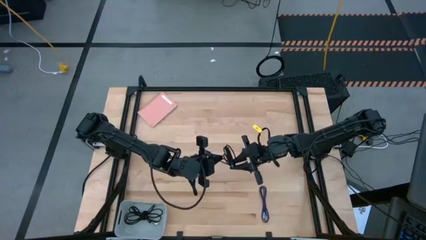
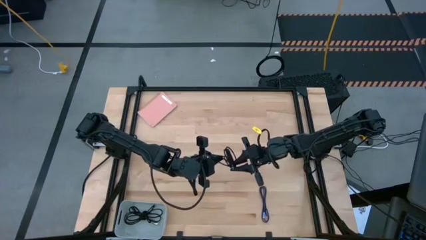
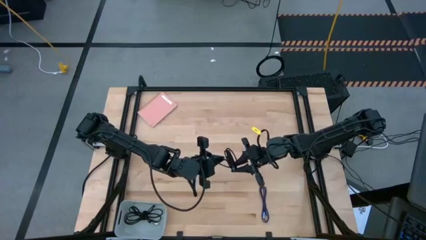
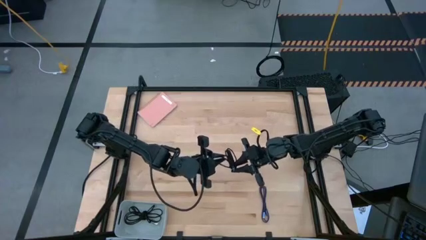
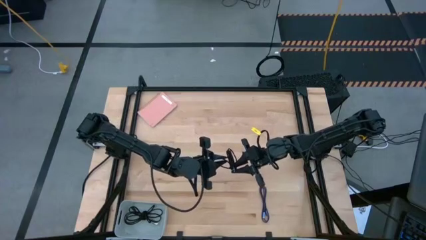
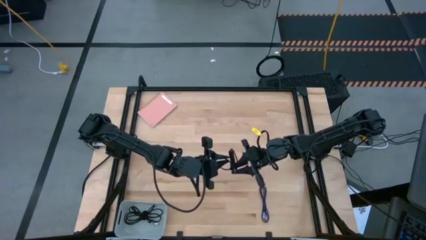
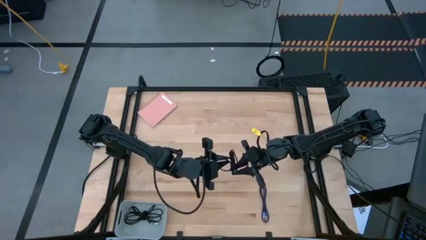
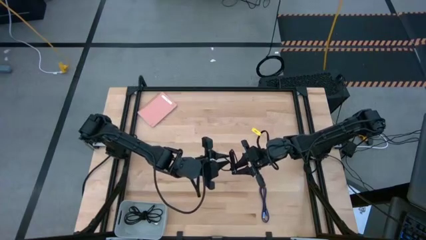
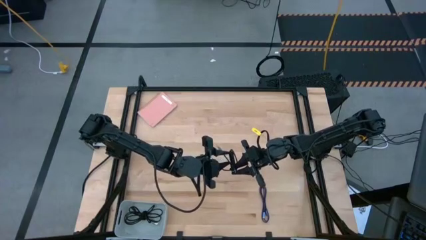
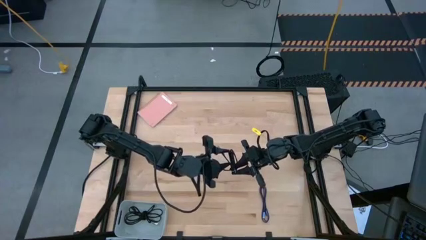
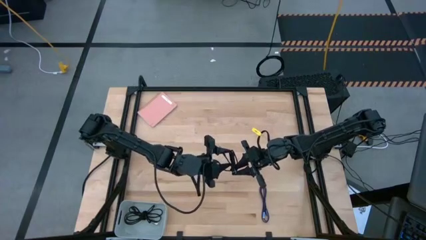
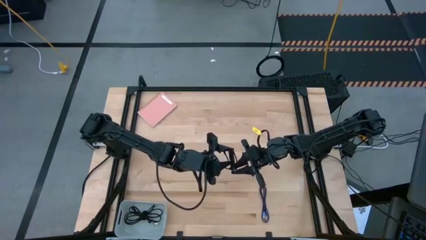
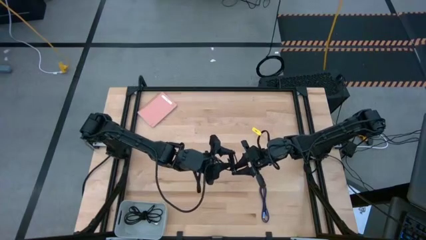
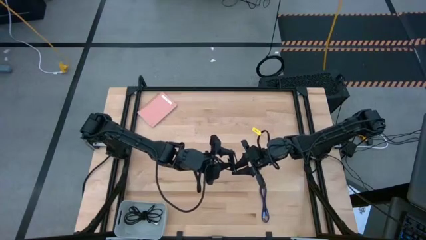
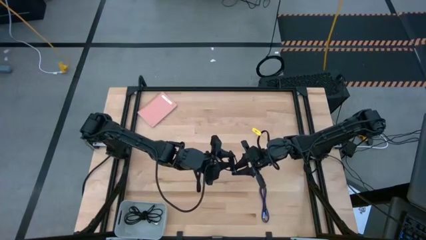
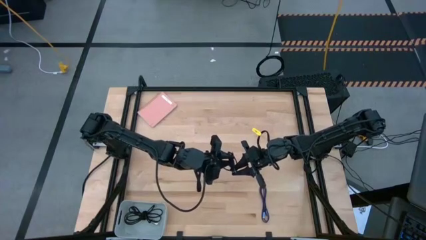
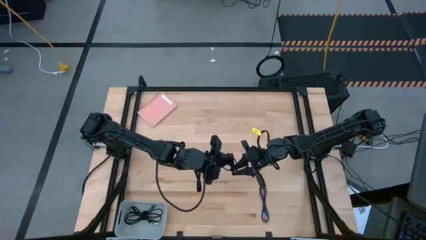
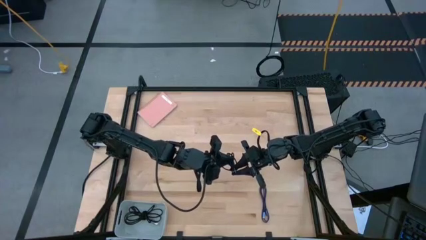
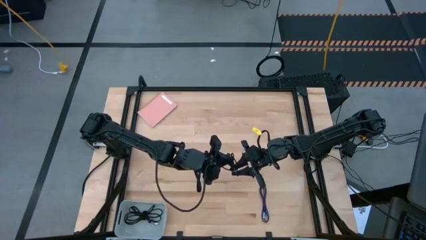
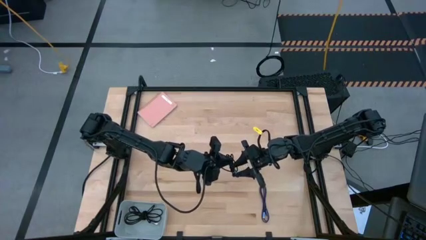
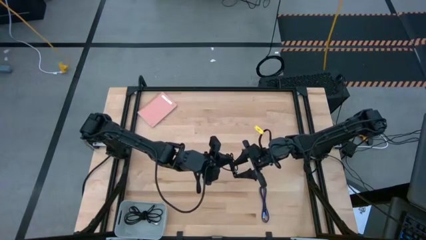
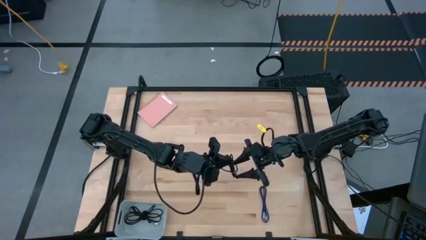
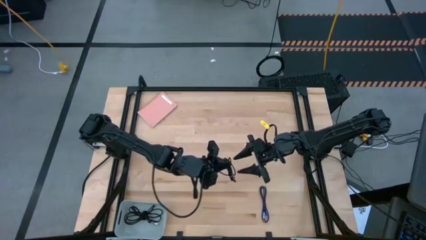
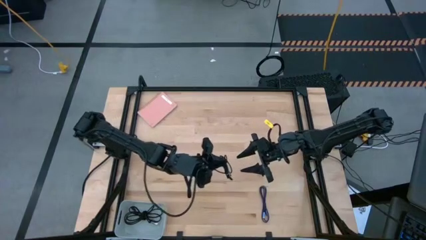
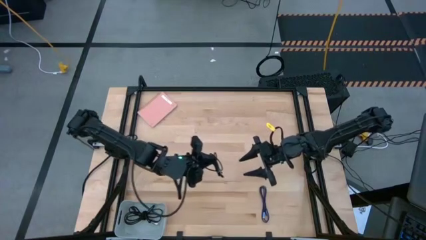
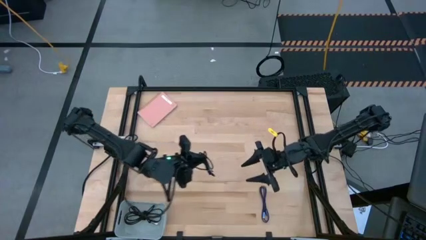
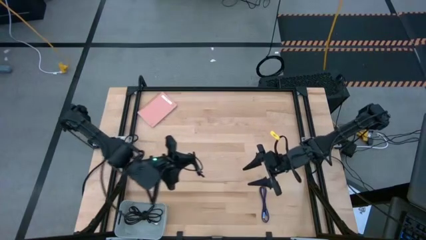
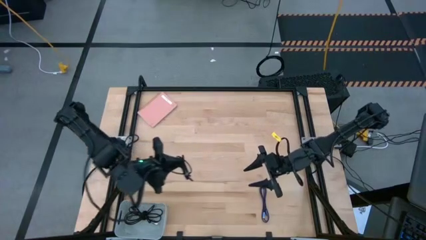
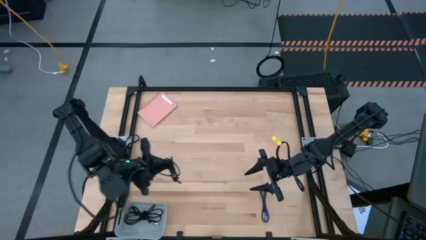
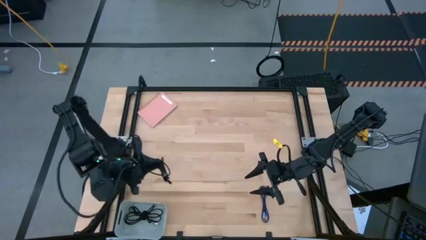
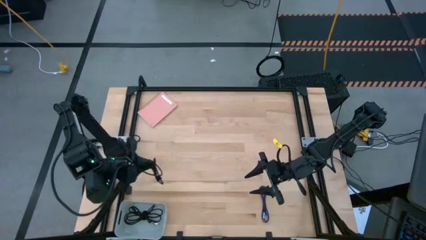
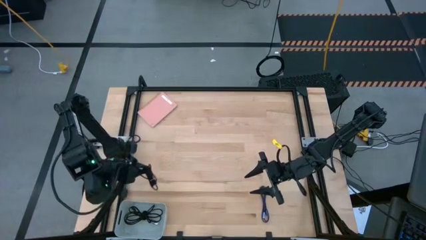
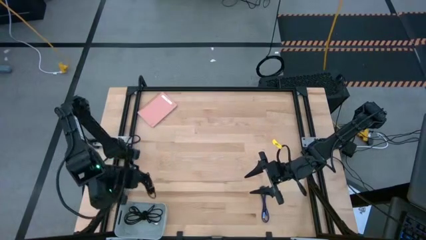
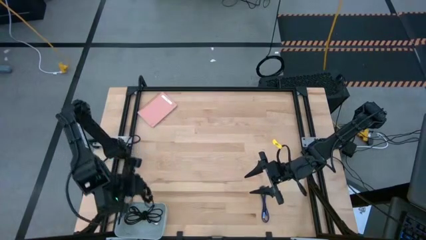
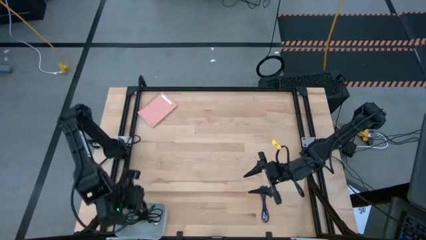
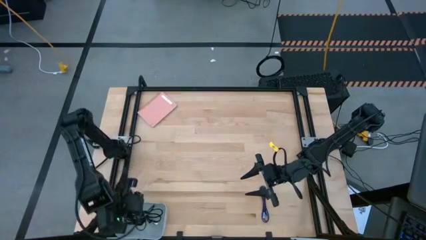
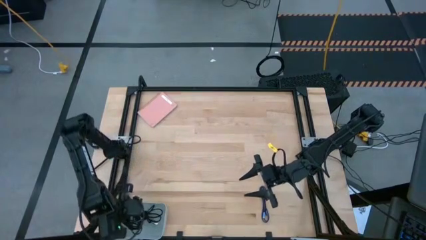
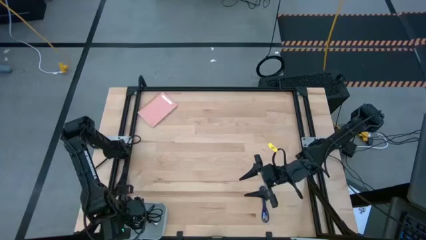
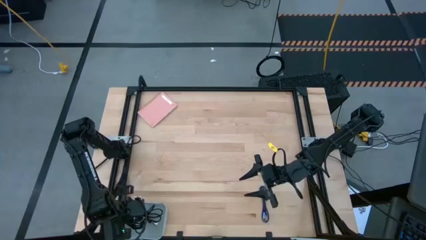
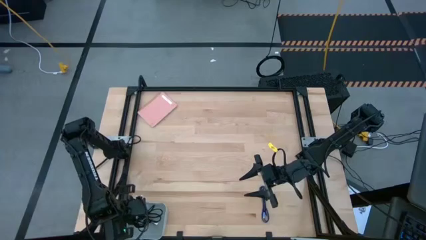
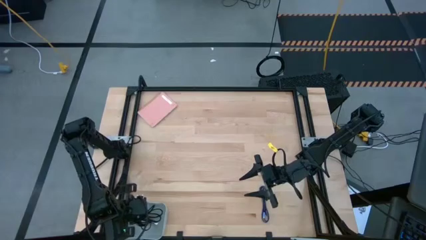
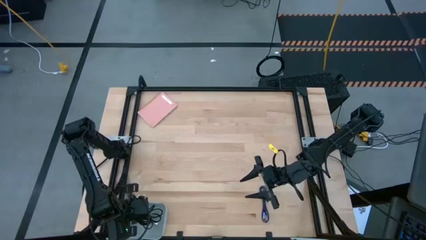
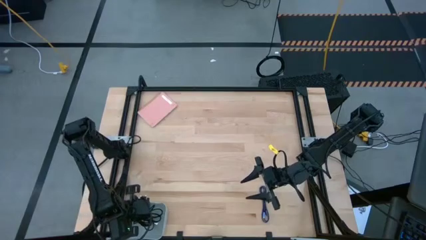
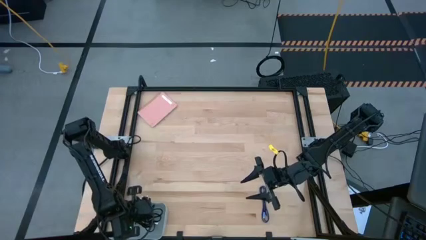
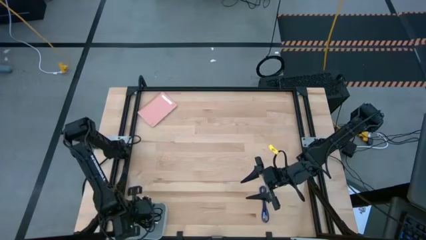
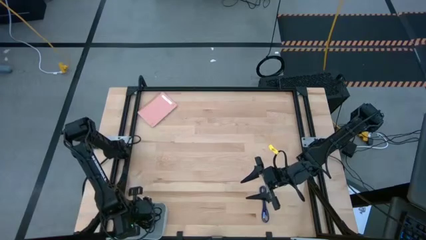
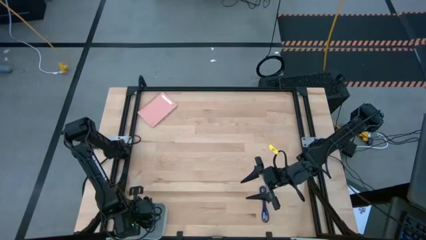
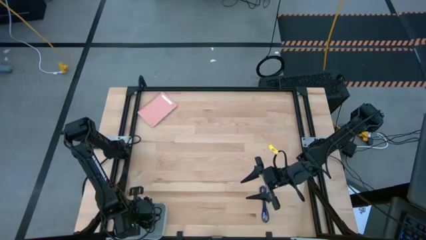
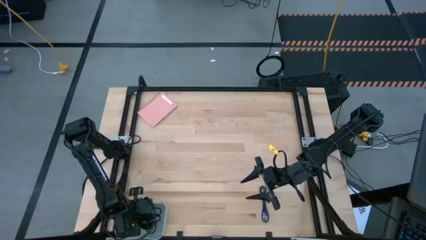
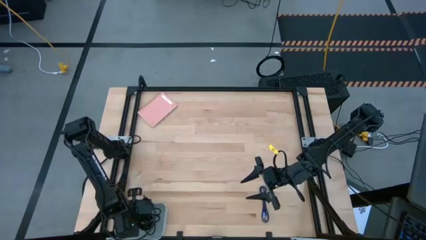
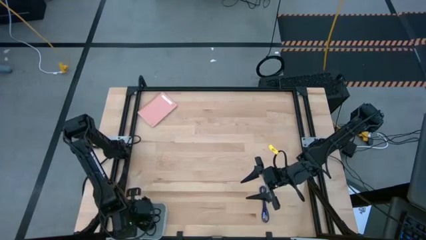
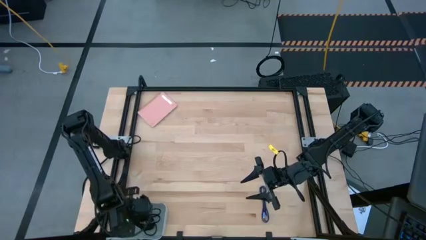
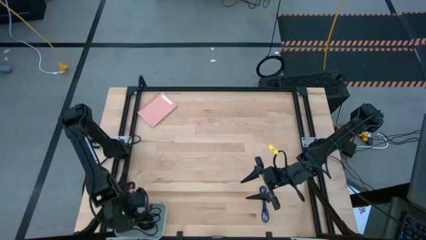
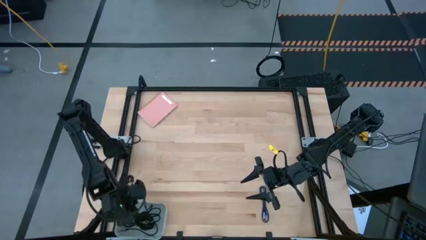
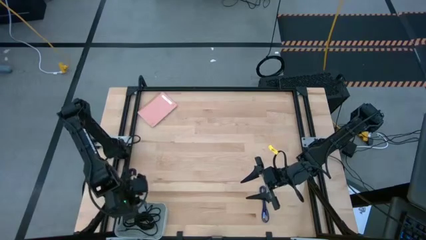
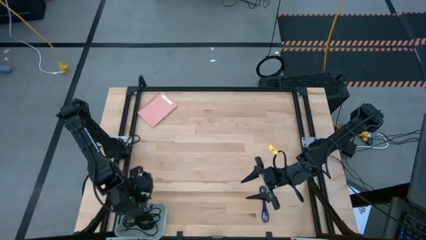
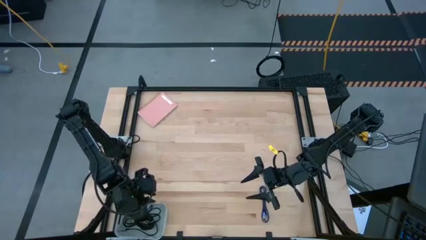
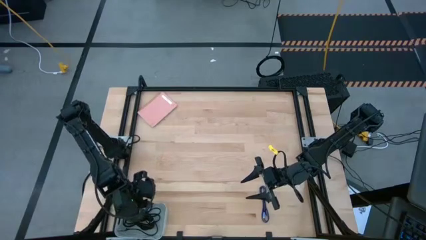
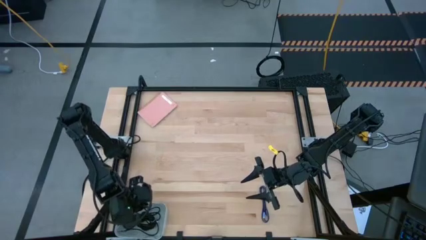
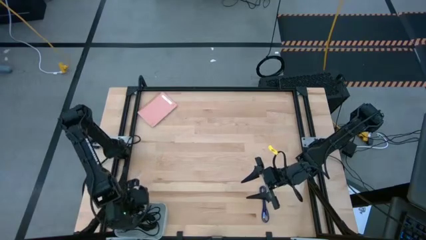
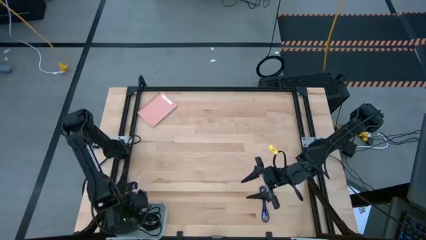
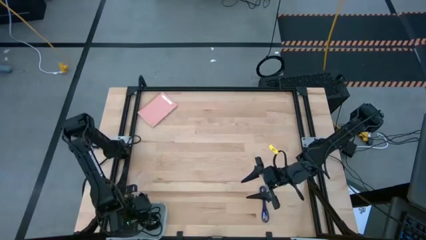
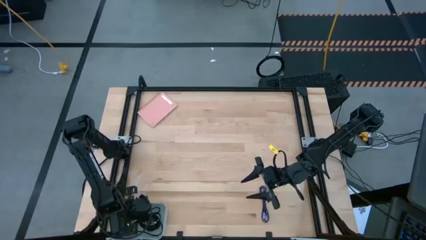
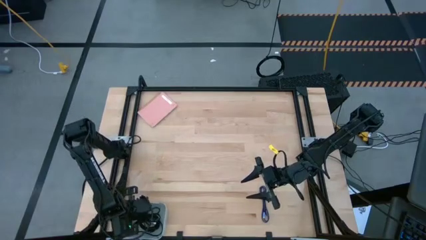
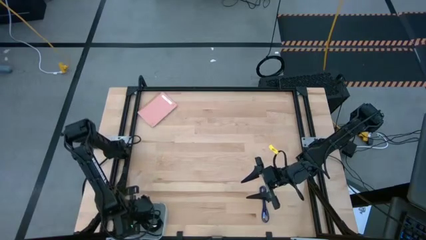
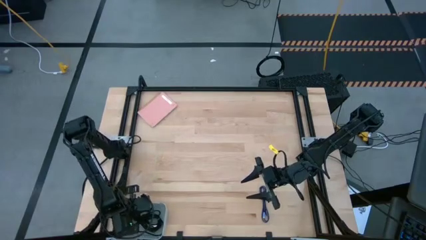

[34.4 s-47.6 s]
Task: Pick and place USB-C Cables
Put the black charger cable into the white bin

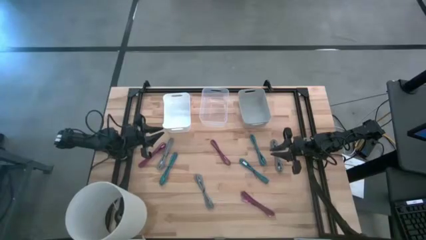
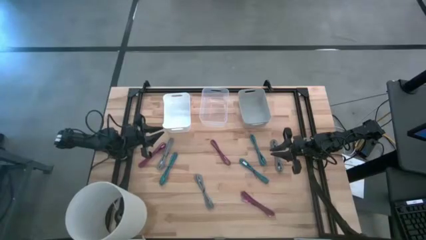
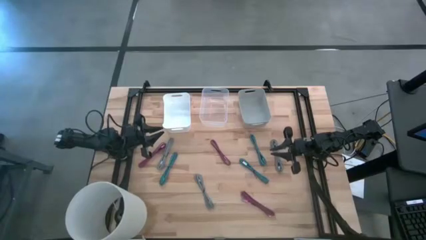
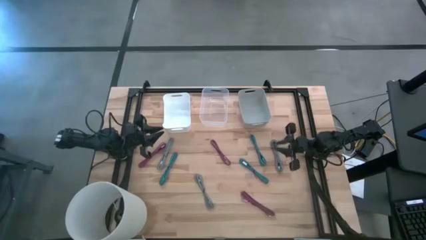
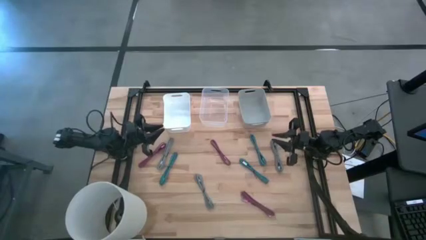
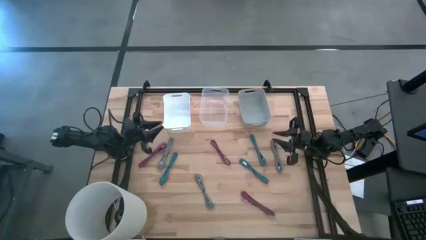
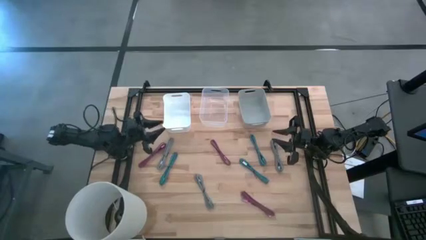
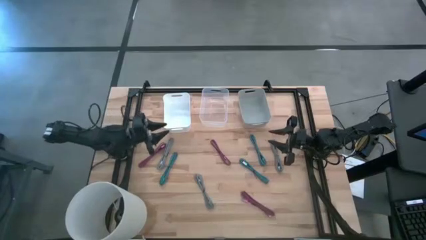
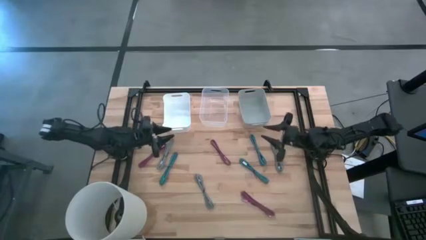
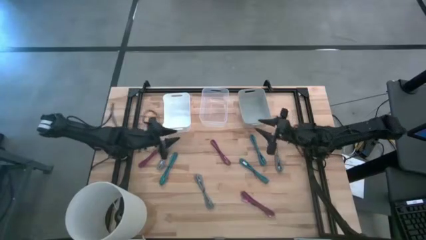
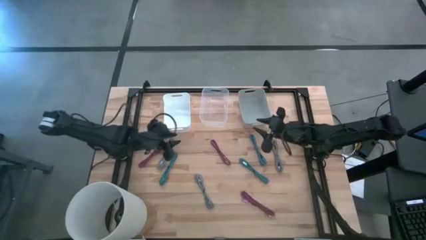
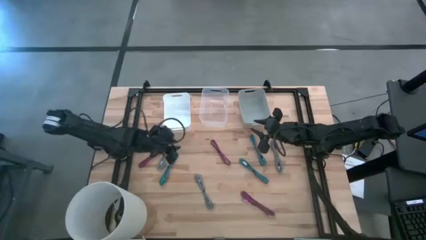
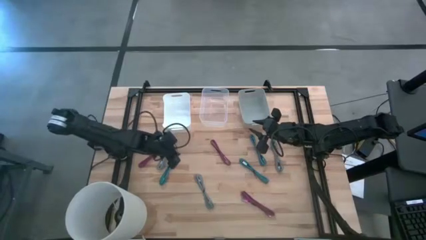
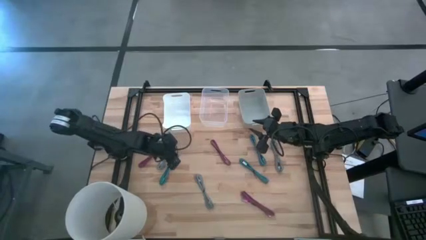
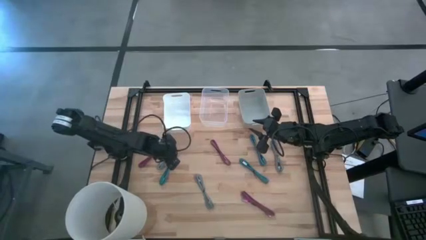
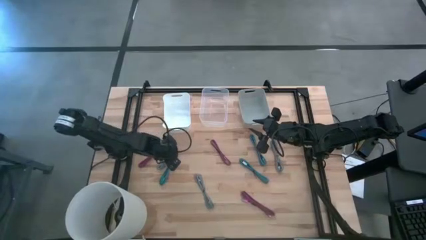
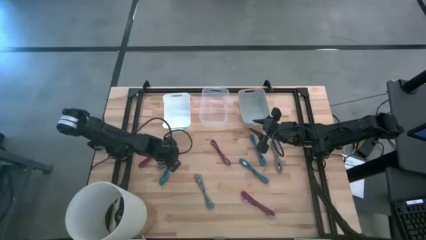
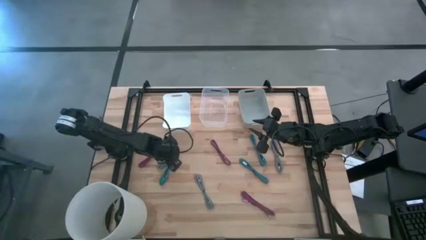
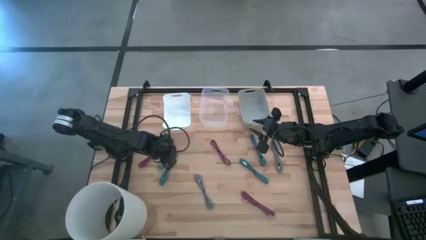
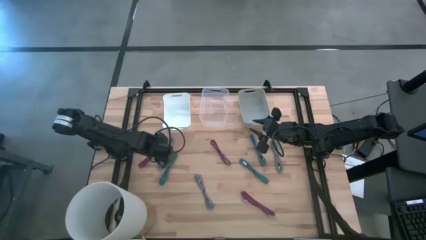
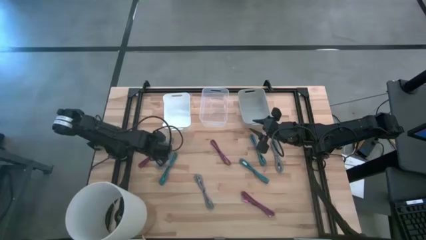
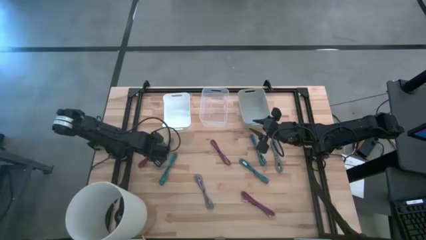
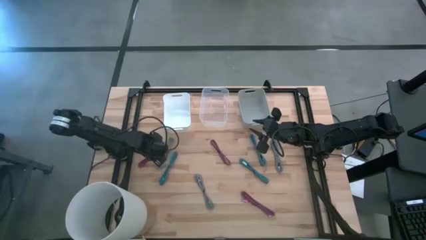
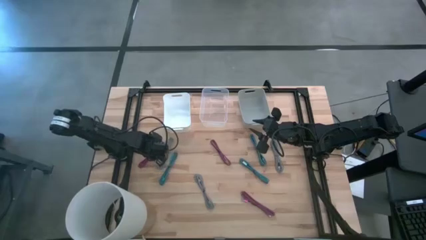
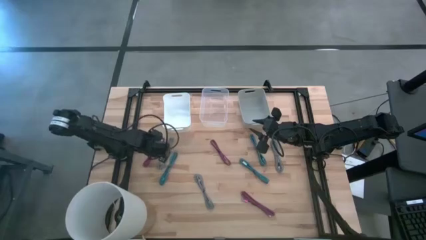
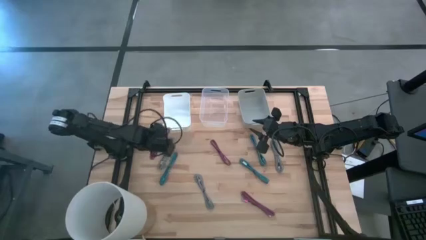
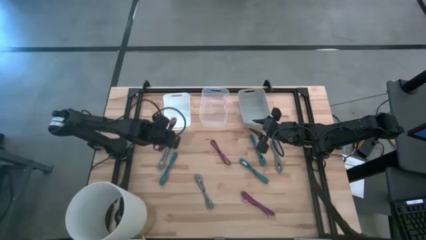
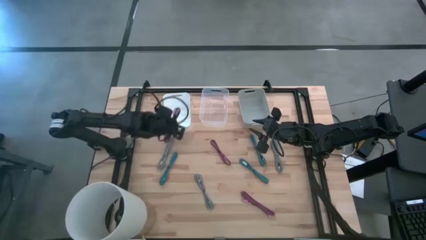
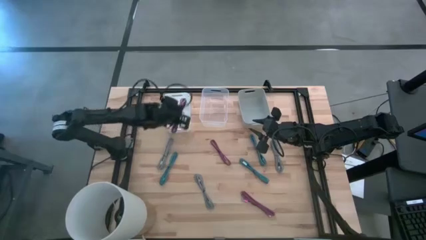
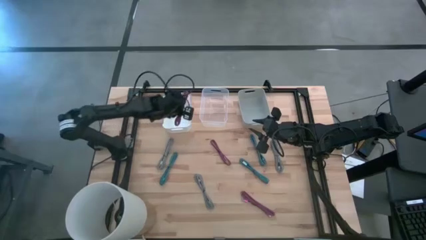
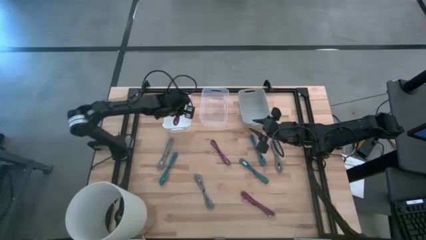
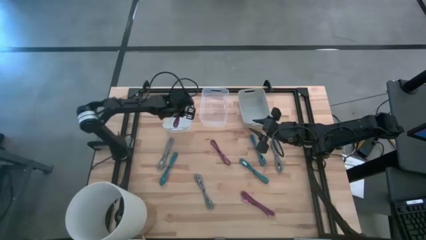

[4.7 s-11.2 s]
Task: Pick & Place USB Port
Put the left pink charger cable into the white bin
